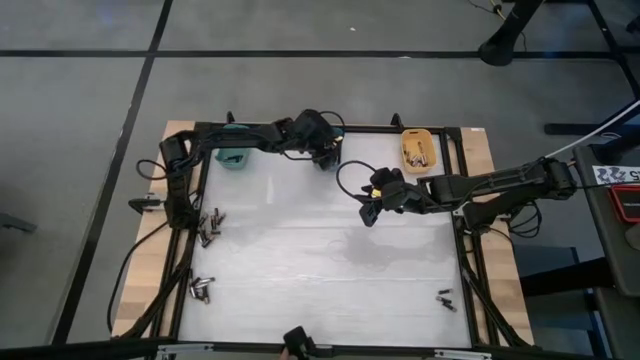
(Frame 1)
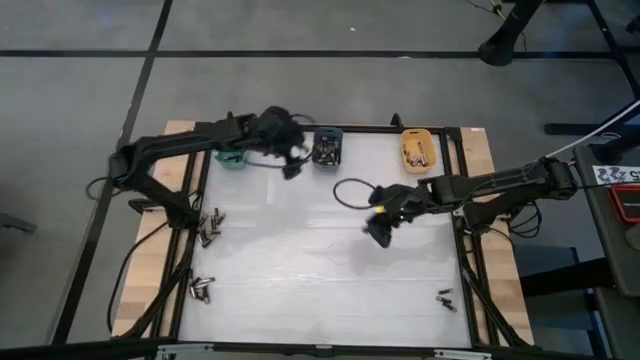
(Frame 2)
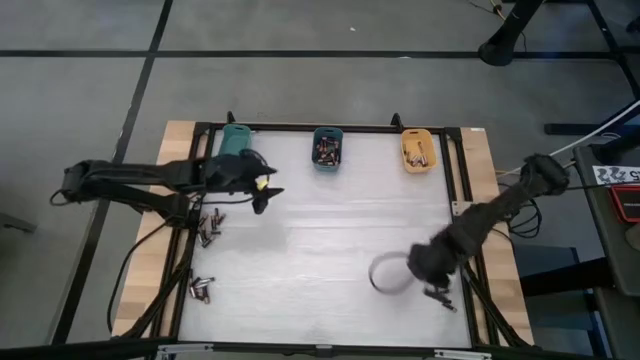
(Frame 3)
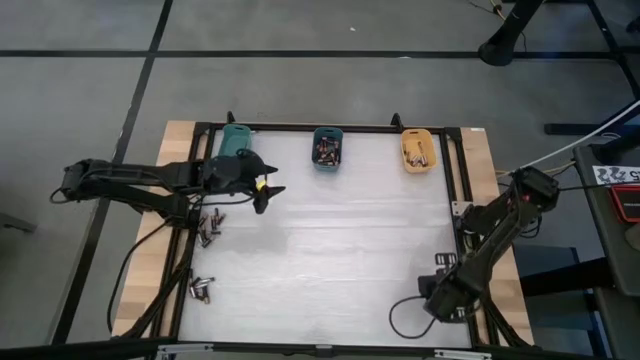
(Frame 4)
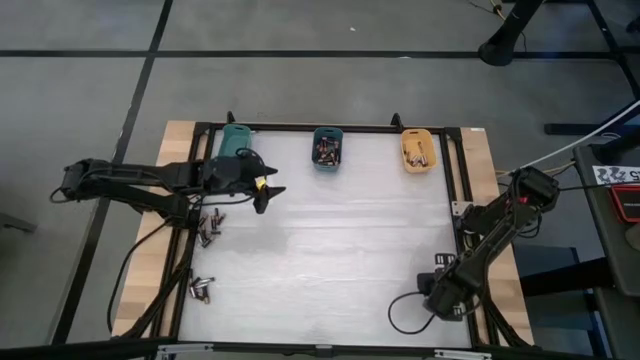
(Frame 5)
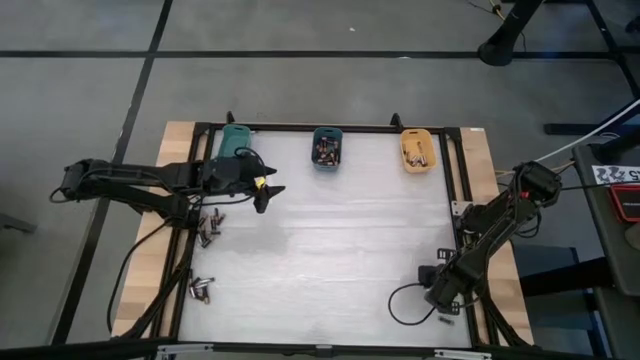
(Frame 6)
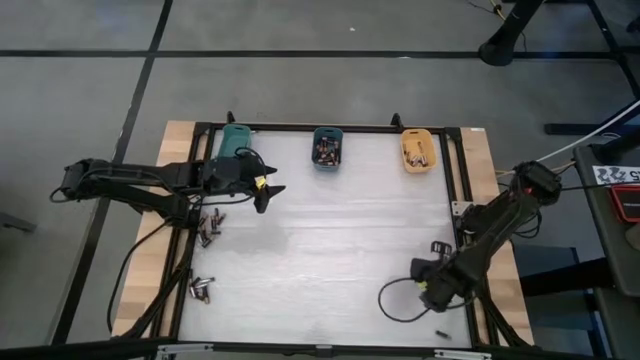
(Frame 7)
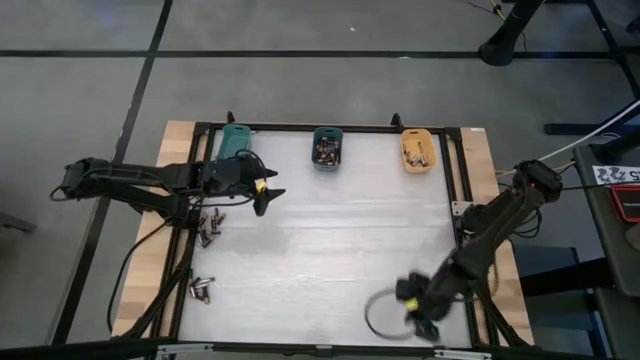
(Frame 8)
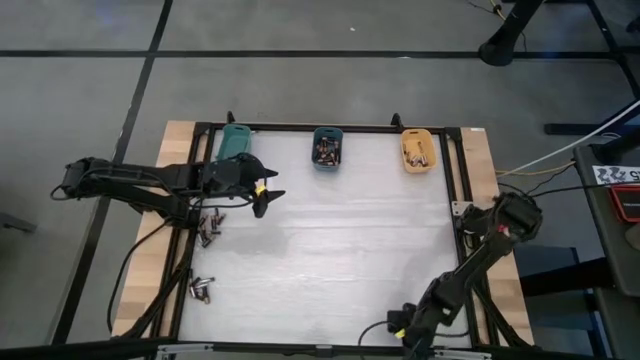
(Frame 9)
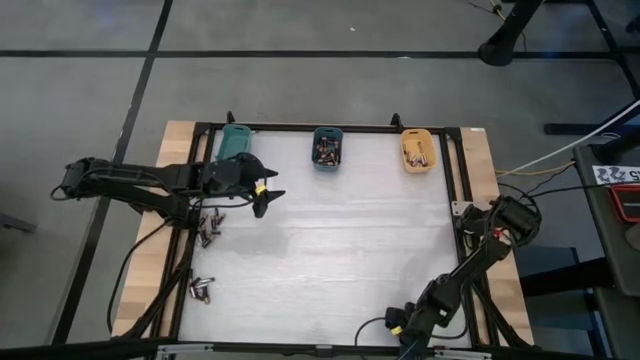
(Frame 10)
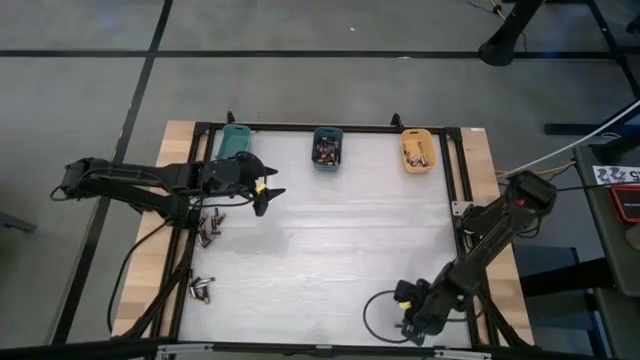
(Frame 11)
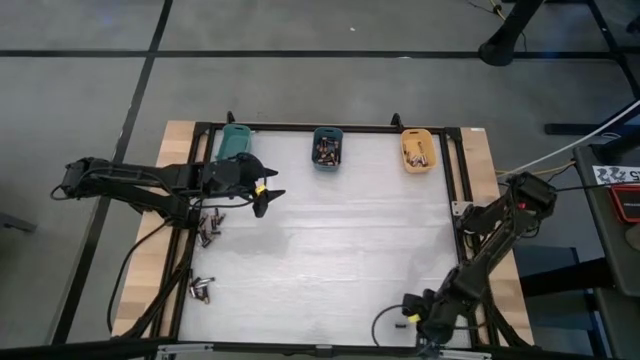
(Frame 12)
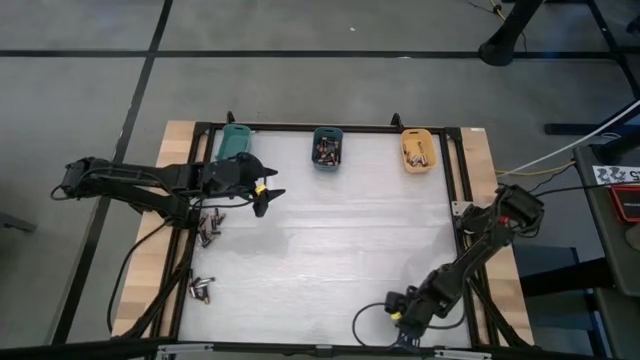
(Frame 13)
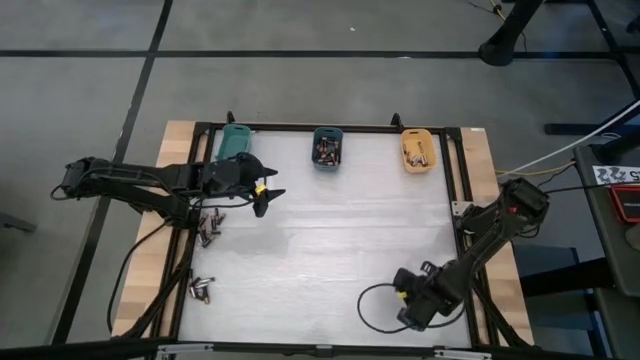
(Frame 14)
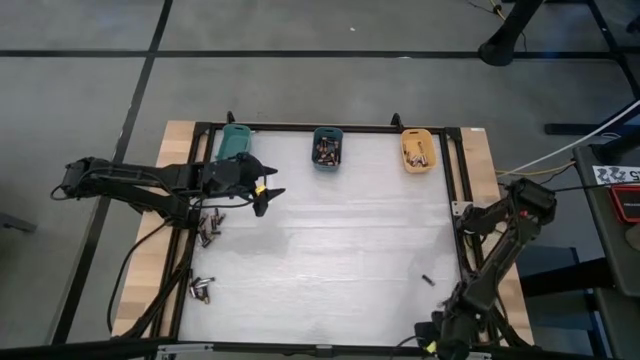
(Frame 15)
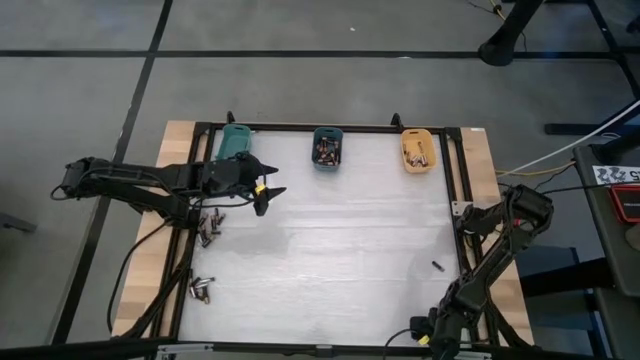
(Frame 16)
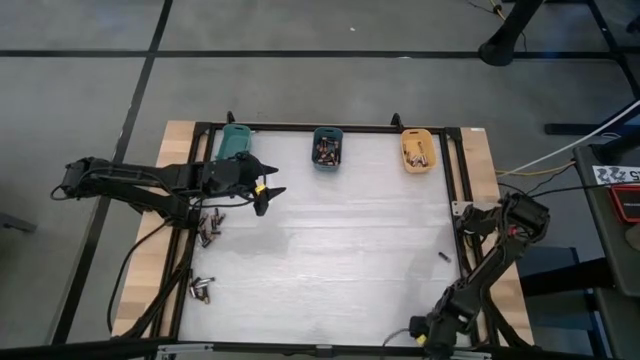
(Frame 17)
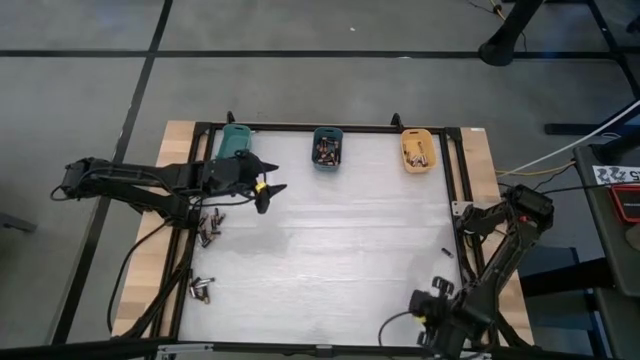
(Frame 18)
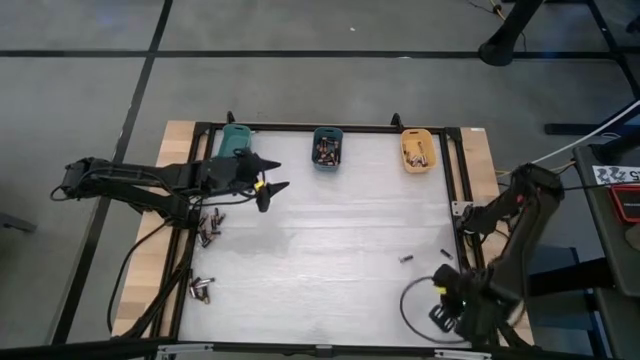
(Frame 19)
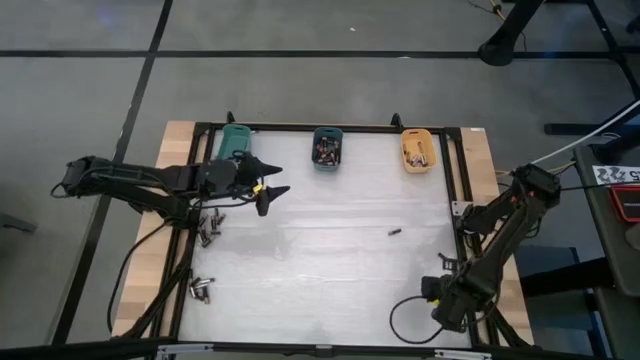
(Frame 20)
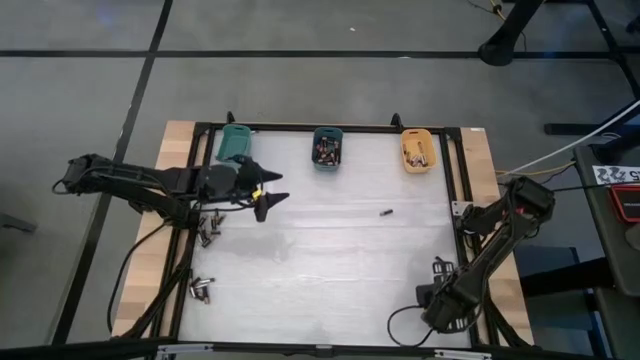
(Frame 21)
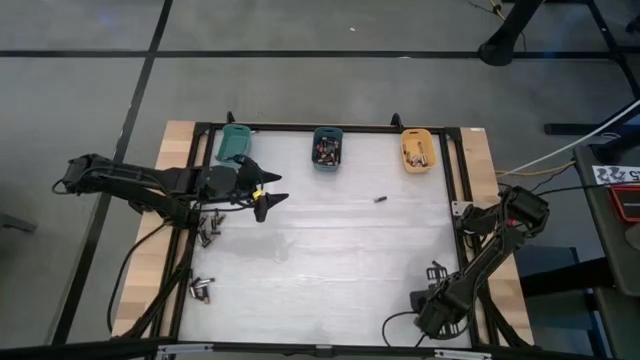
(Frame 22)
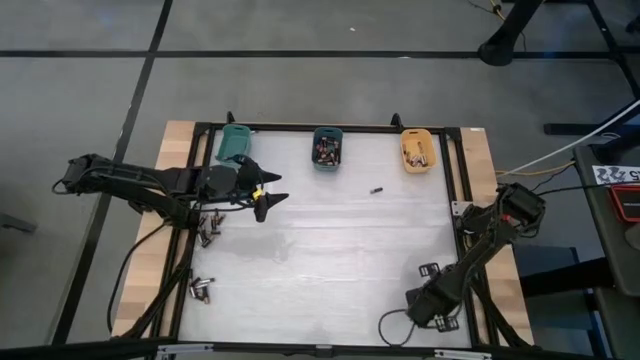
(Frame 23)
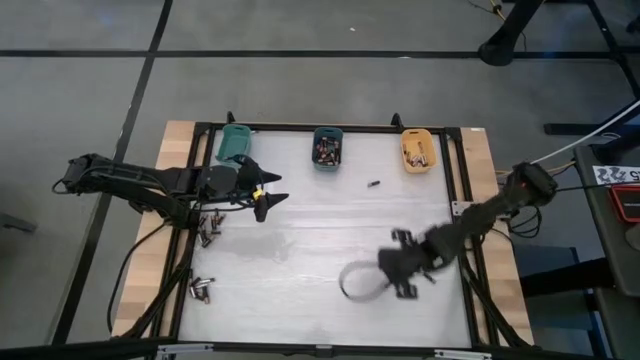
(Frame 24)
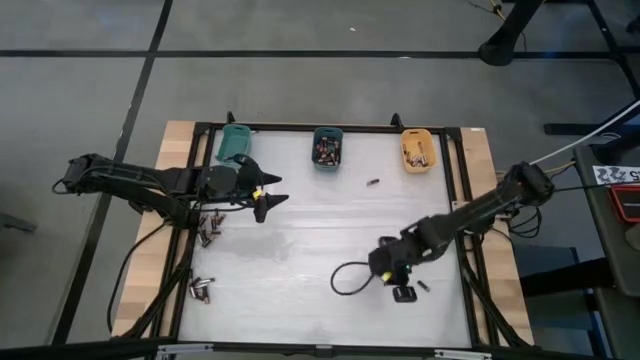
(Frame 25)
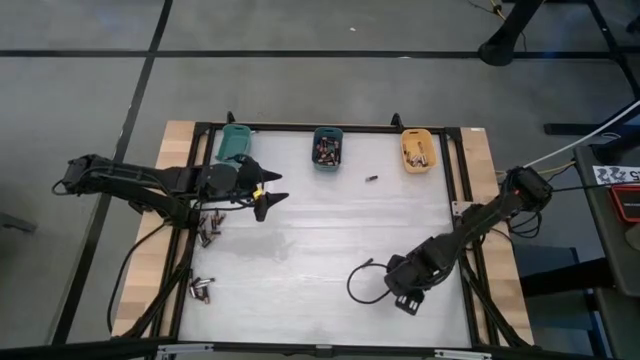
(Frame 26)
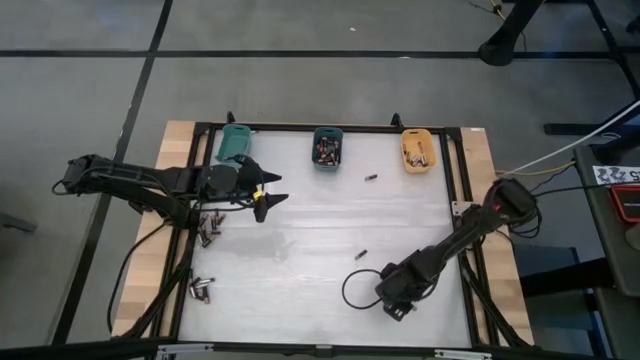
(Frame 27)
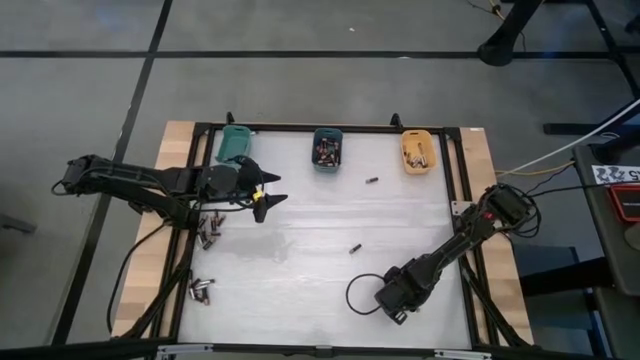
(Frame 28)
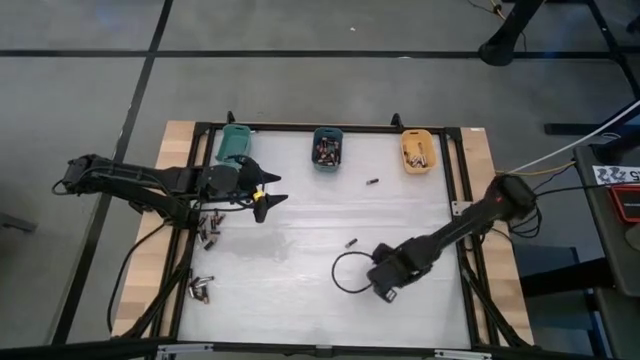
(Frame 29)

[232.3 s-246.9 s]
Task: Sort batteries
Put the brown battery into the green bin

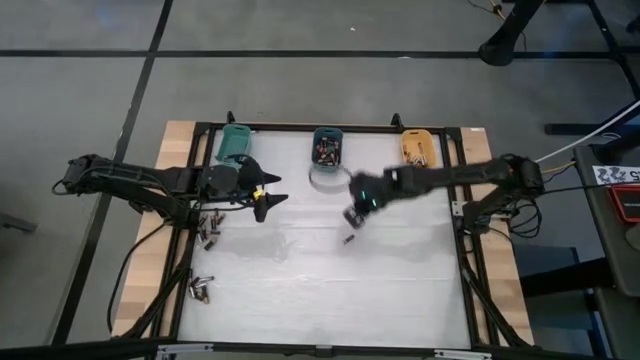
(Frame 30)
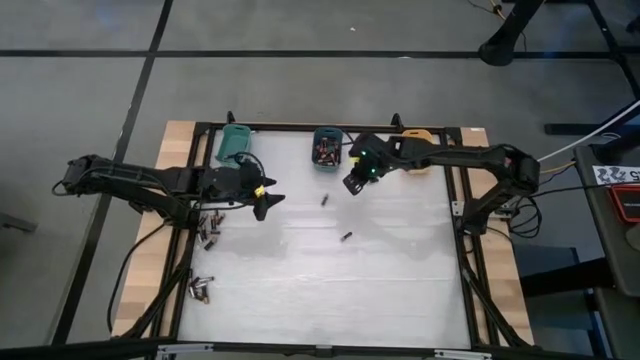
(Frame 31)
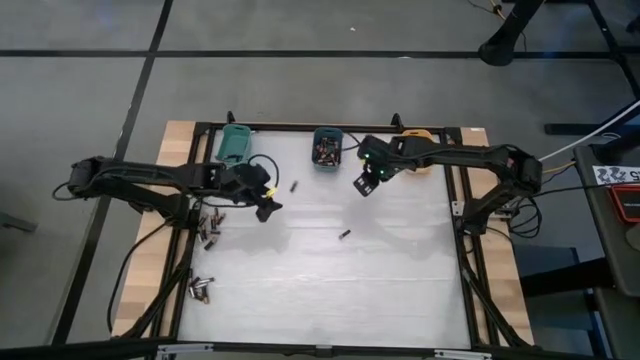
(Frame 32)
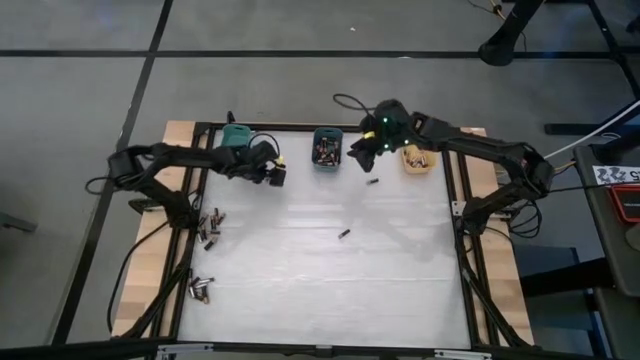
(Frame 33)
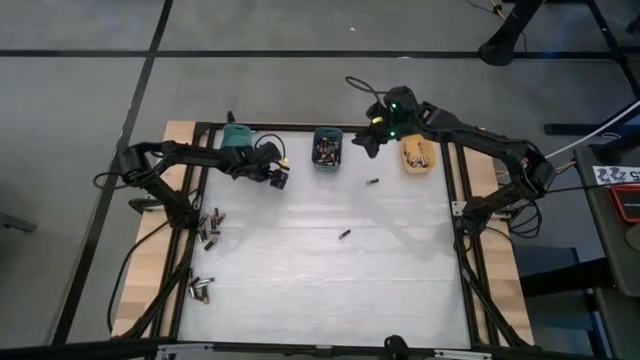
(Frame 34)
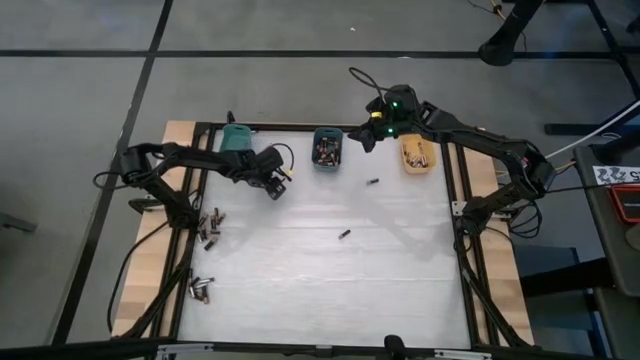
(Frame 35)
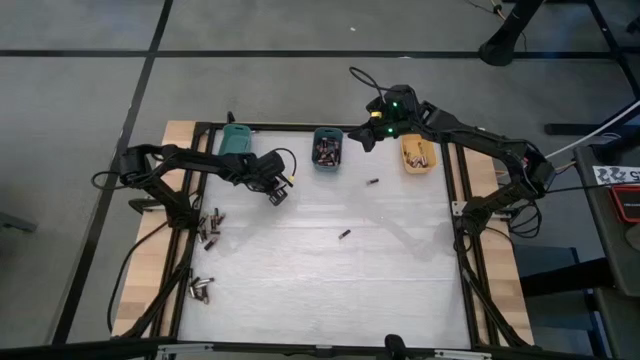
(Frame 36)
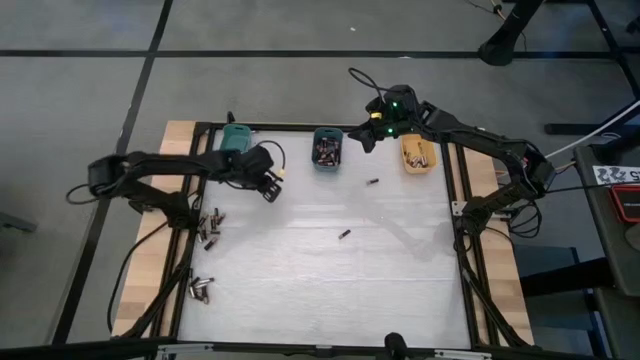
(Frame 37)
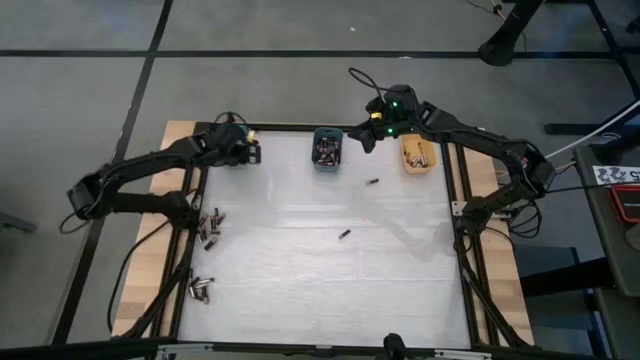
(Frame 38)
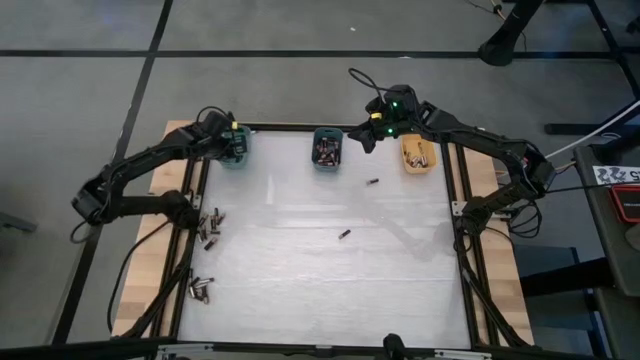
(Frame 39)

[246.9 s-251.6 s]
Put the brown battery into the green bin
